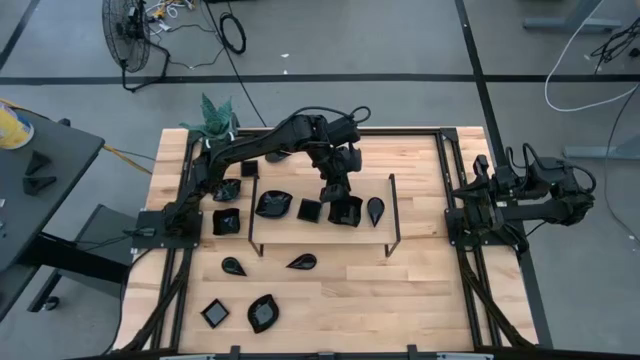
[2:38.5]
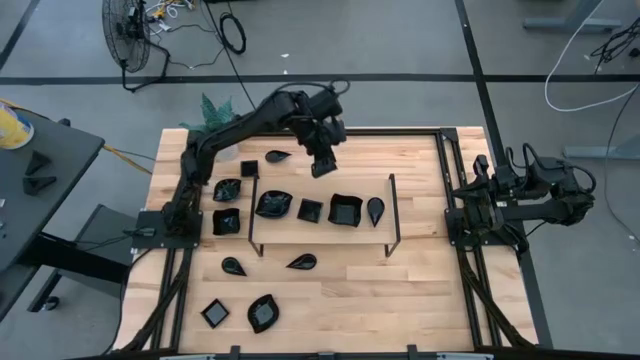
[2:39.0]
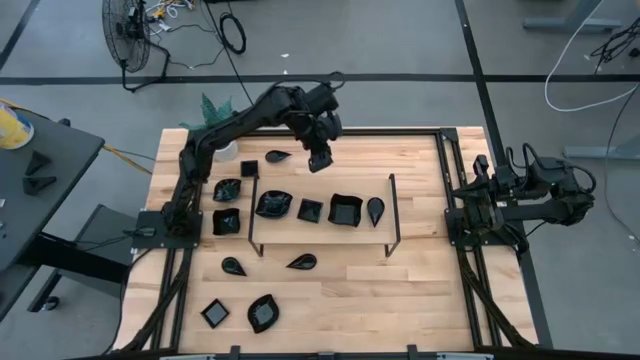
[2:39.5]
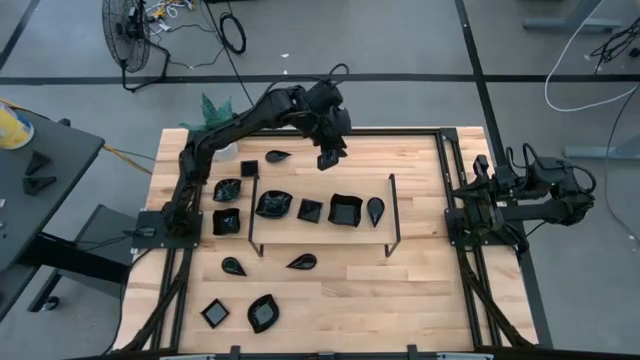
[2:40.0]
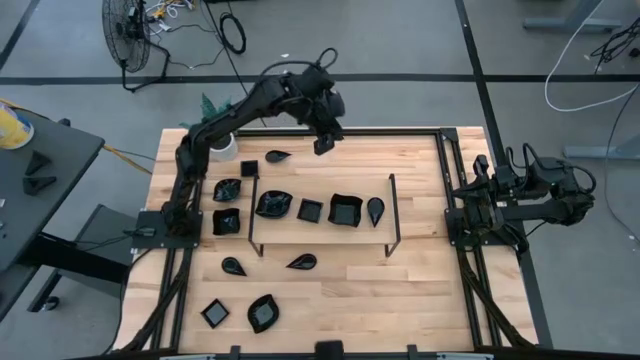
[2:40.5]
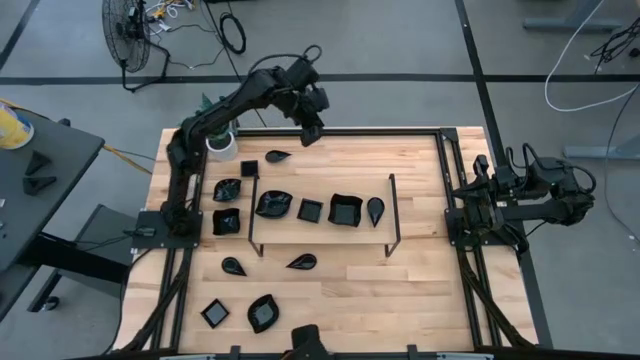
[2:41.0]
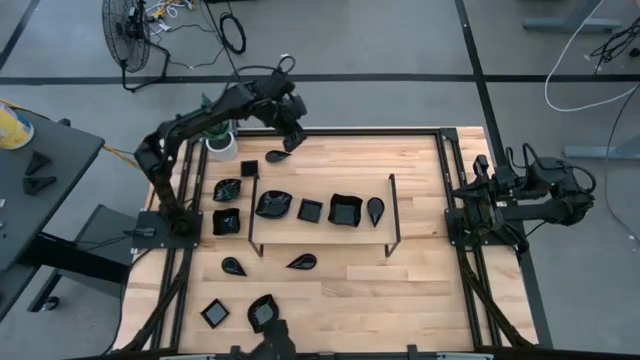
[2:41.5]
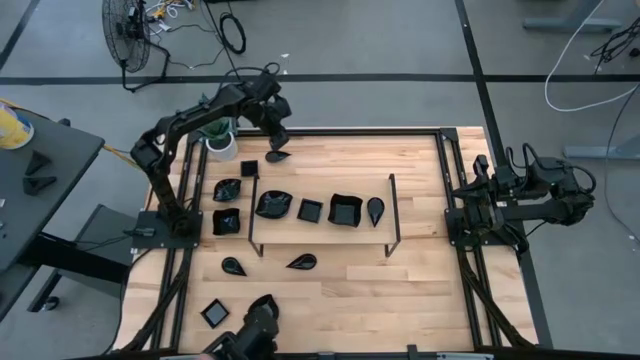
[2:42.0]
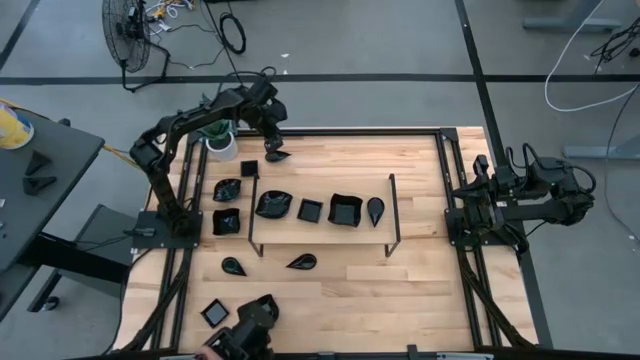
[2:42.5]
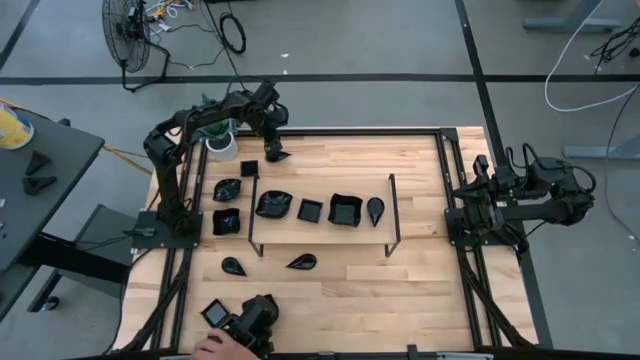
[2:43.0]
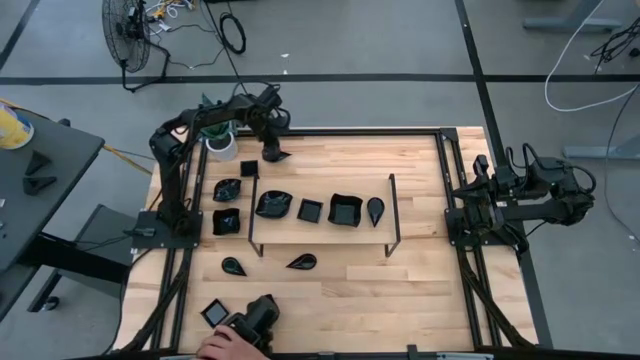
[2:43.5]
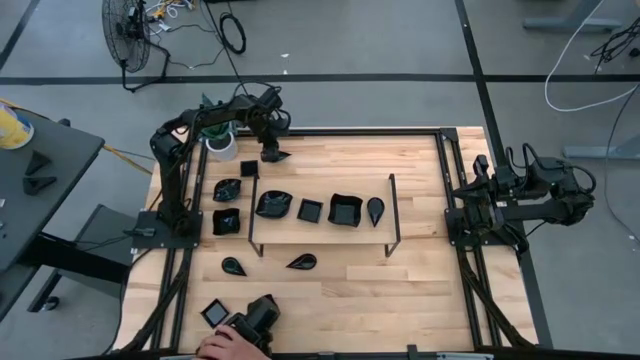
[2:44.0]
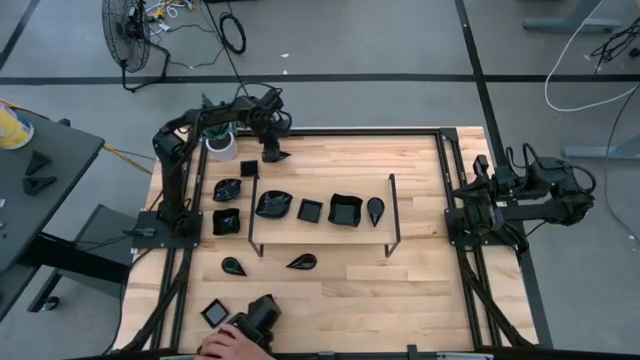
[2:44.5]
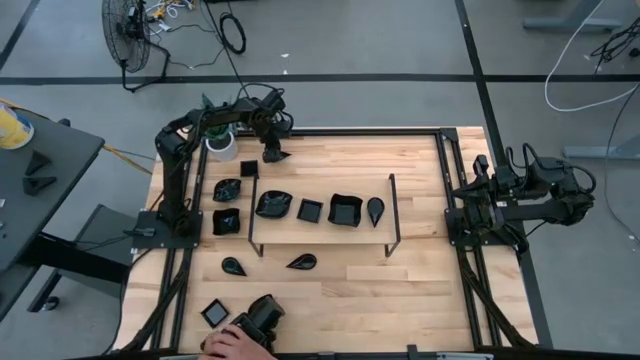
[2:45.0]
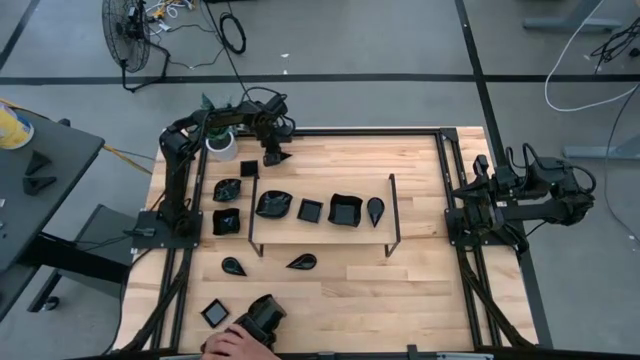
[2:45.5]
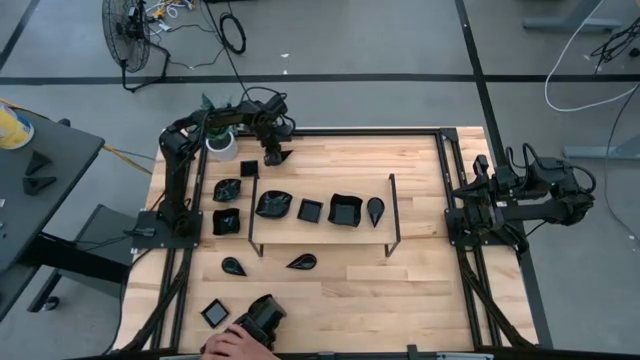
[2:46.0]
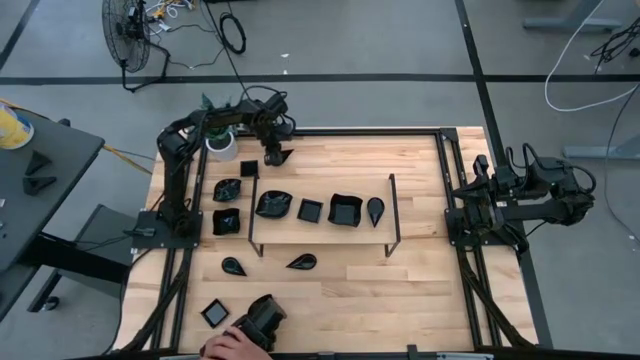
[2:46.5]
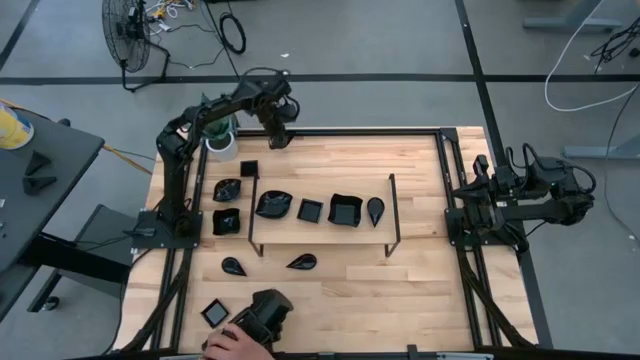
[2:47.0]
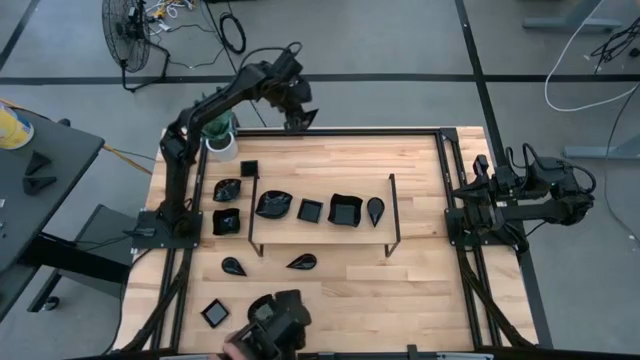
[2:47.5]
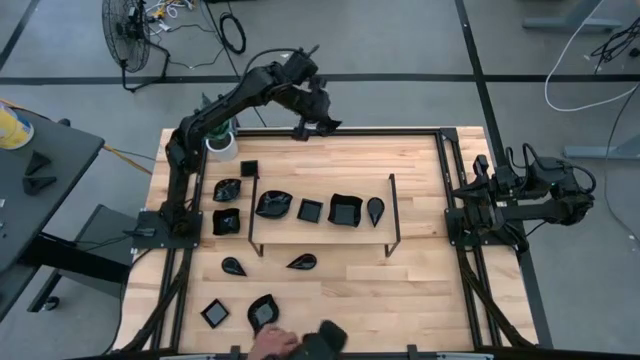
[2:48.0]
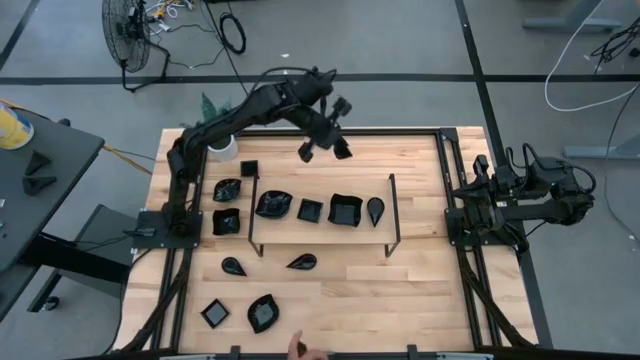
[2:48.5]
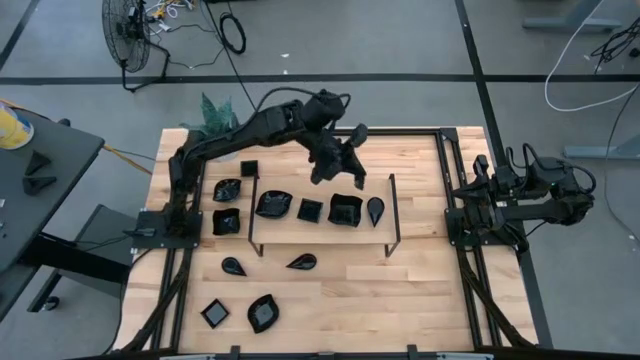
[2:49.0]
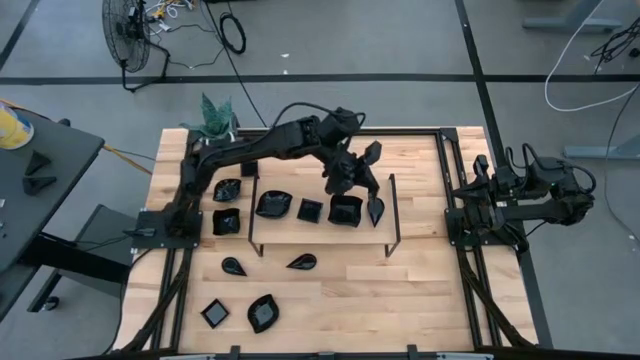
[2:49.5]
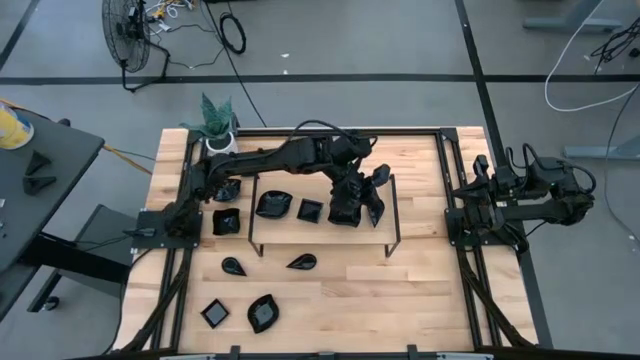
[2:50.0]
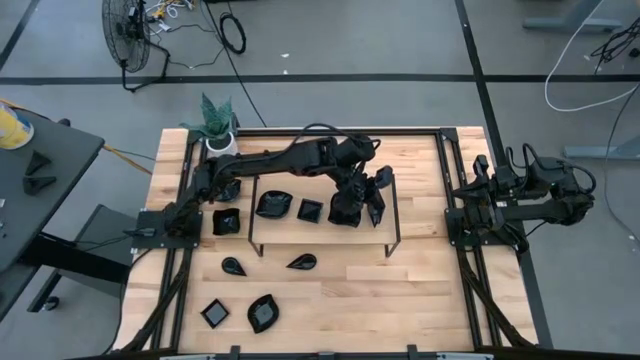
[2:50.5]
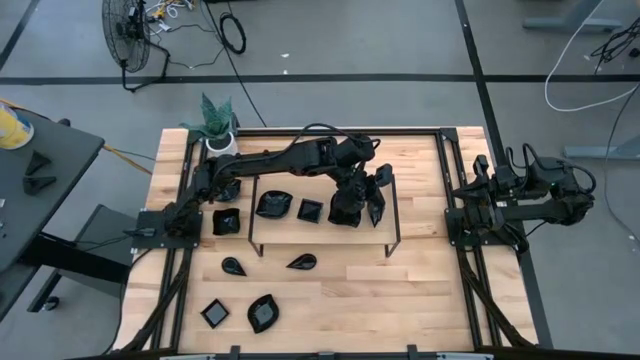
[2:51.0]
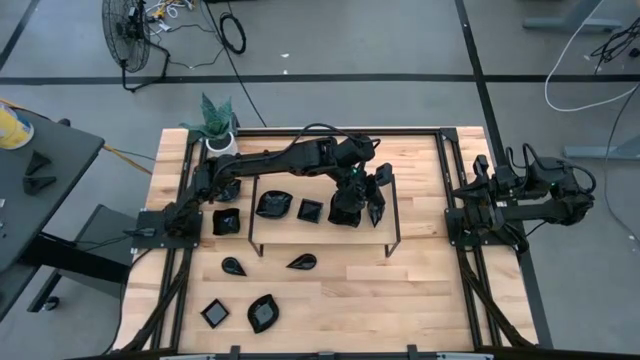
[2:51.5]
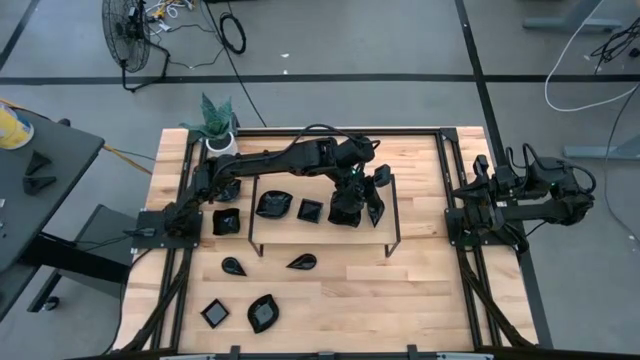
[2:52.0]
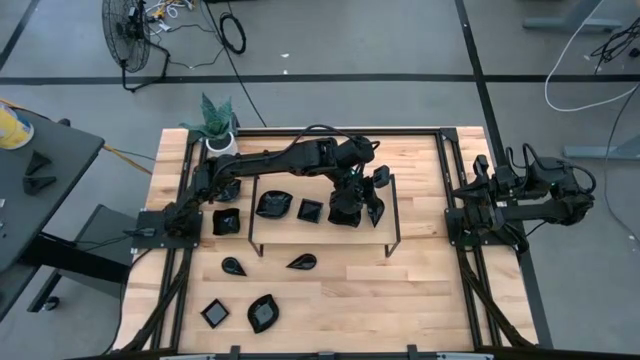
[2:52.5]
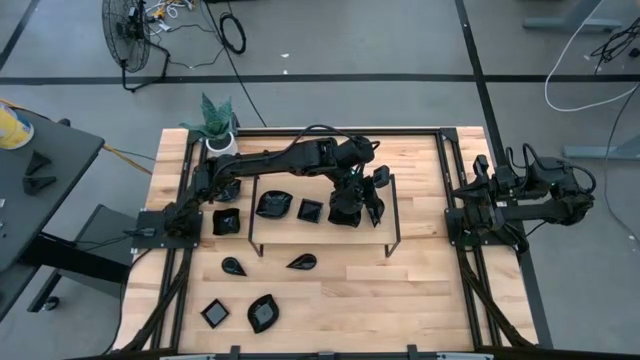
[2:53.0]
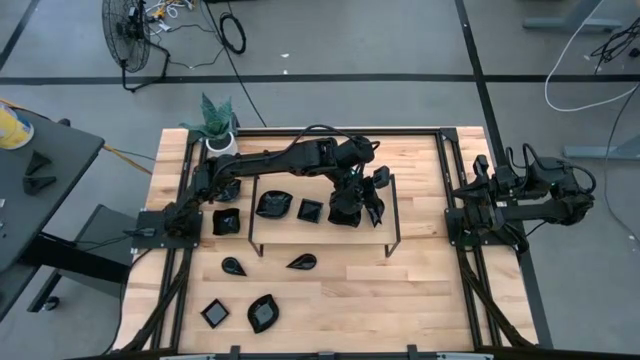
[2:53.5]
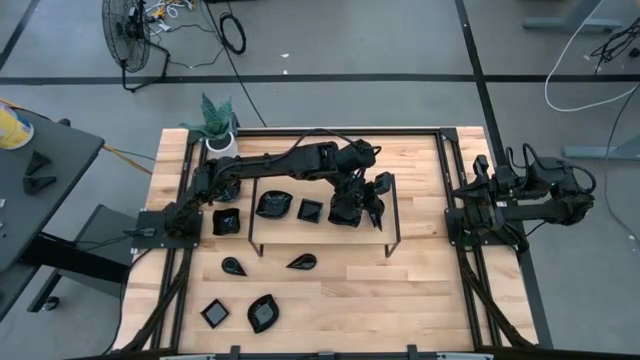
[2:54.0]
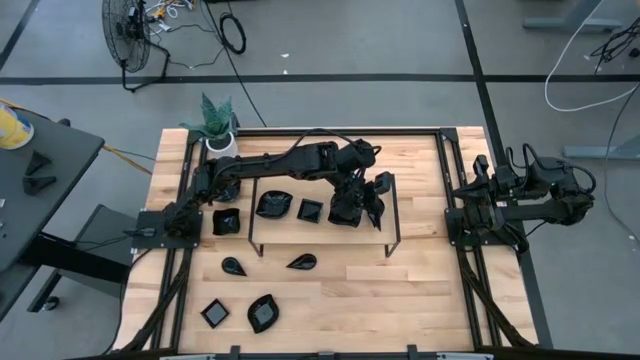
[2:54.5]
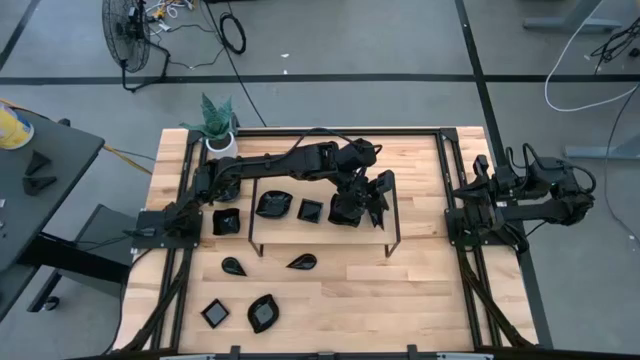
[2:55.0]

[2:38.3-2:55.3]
Task: Pick & Place Mini shaped plates
Stack the drop shaped plate on top of the drop shaped plate on the shelf

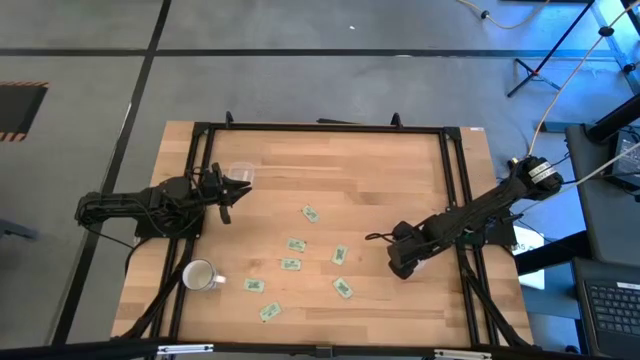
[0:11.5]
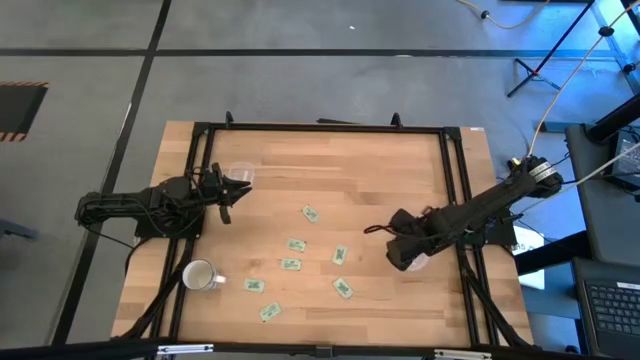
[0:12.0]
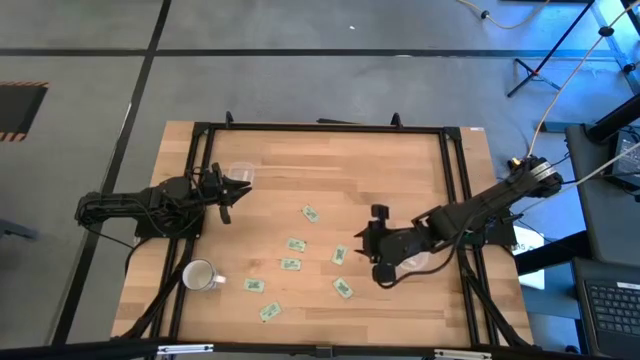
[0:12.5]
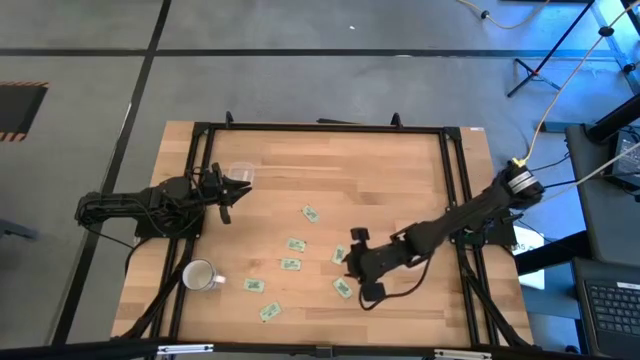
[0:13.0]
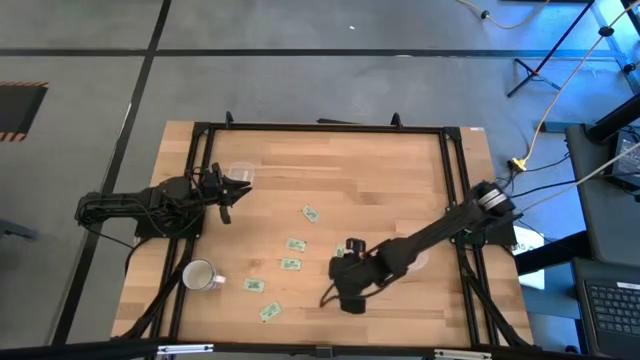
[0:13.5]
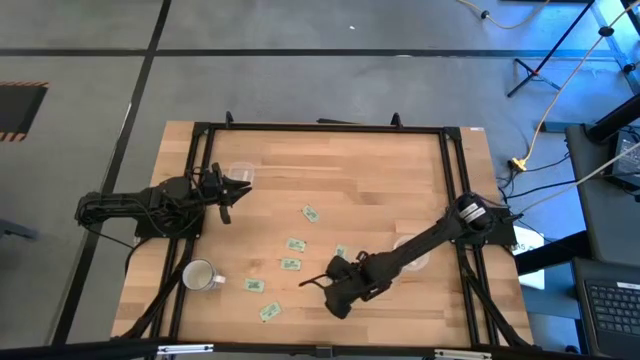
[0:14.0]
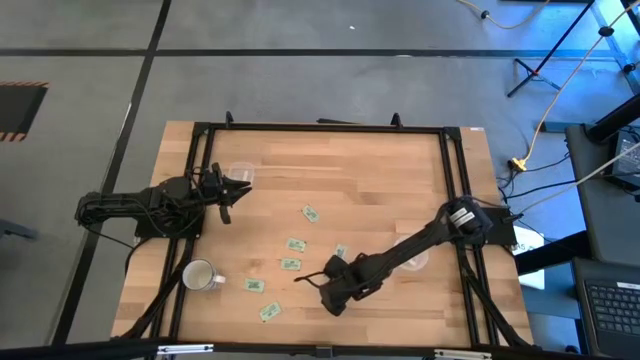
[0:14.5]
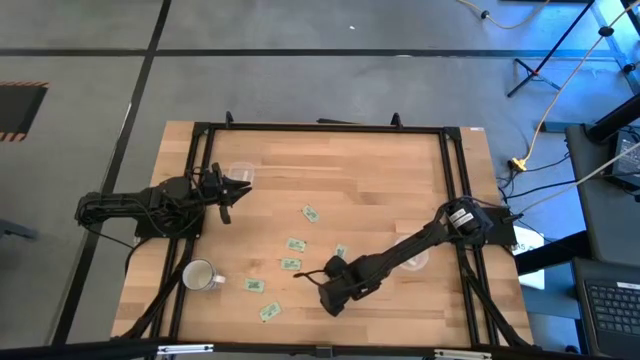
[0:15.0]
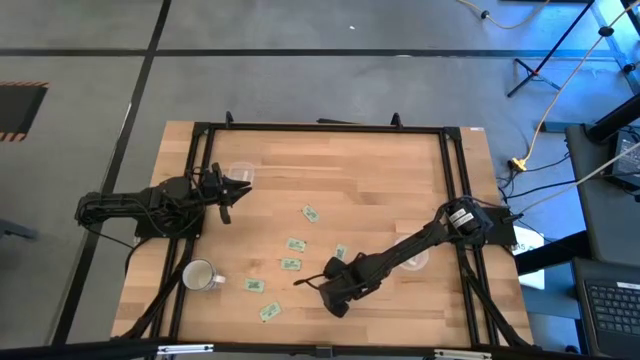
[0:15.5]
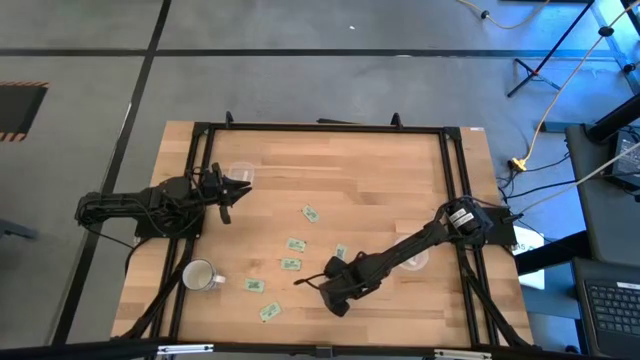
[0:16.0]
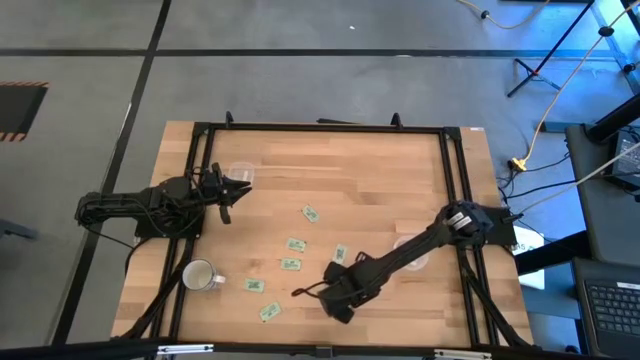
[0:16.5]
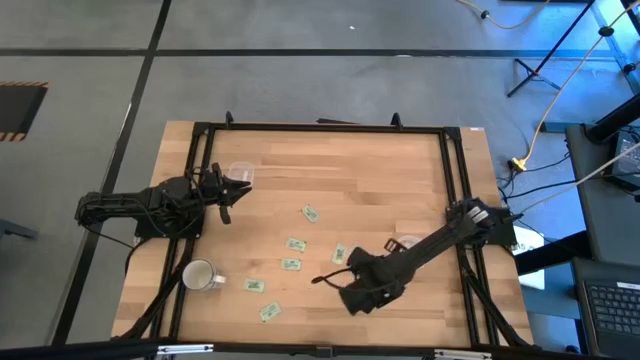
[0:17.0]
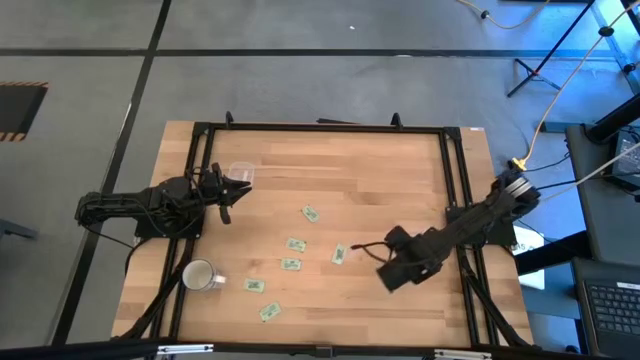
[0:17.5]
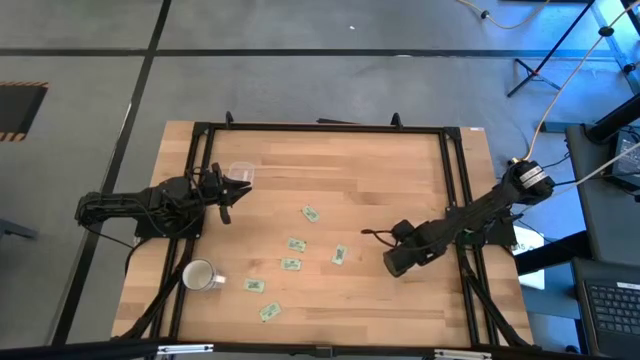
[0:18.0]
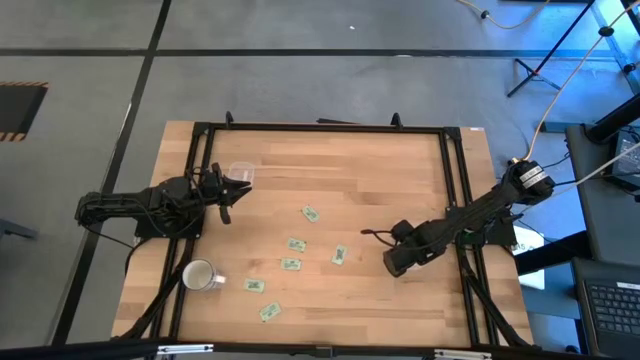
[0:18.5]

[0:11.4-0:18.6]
Task: Pick and place Stevia / Truvia into bins
Put the stevia packet into the round transparent container
